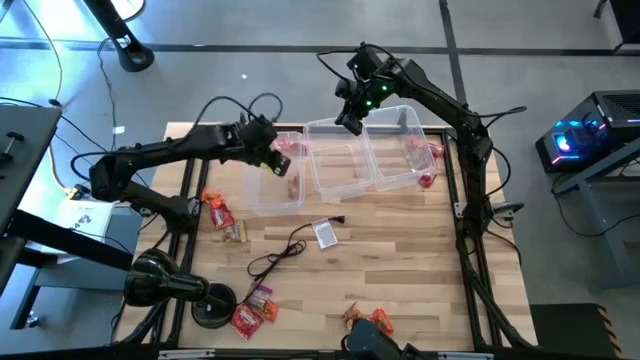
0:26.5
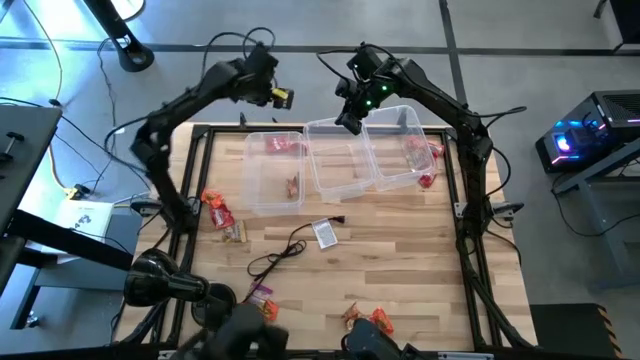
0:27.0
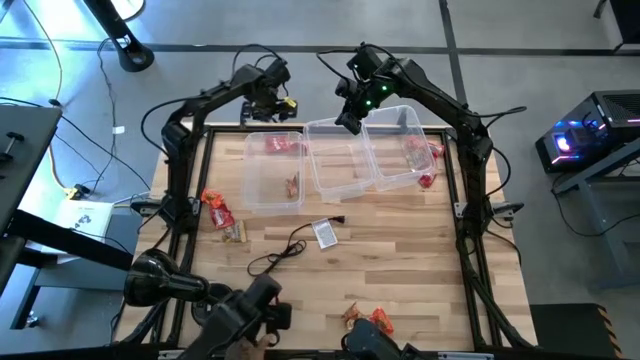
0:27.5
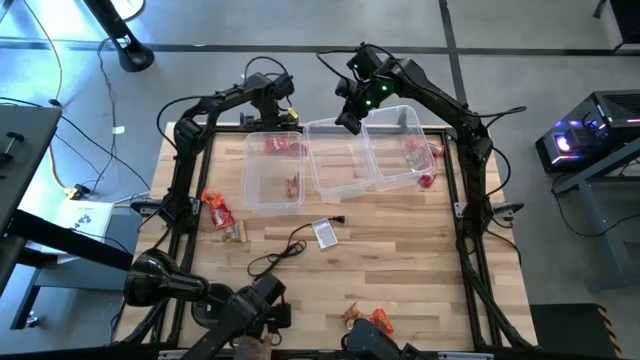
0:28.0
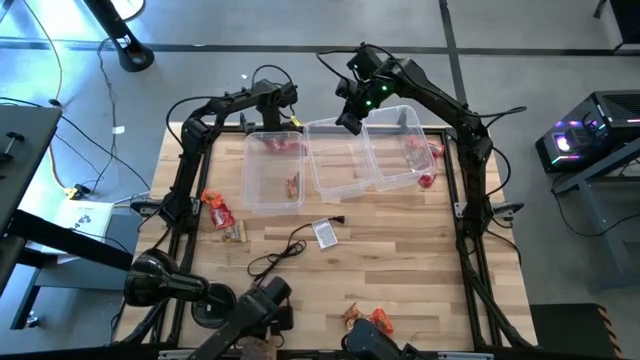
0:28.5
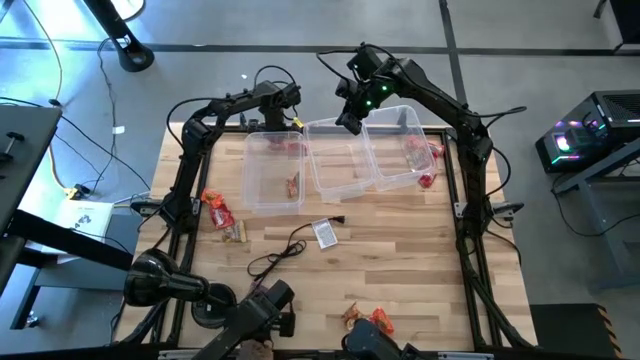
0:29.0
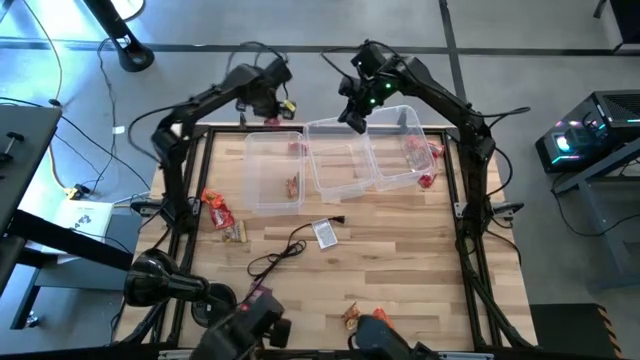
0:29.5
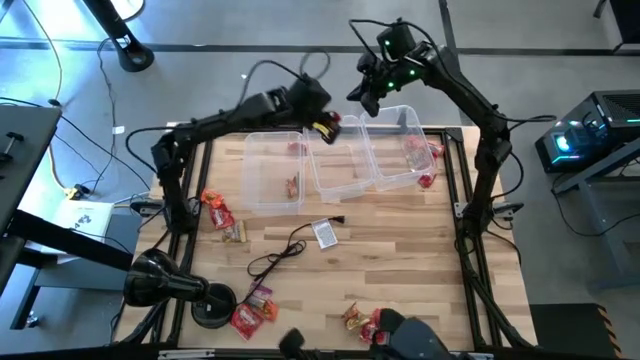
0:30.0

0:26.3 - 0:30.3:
Task: Sort candy
Put the red candy pack into the middle transparent bin

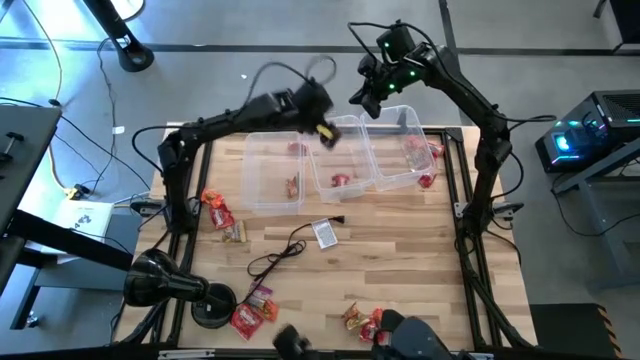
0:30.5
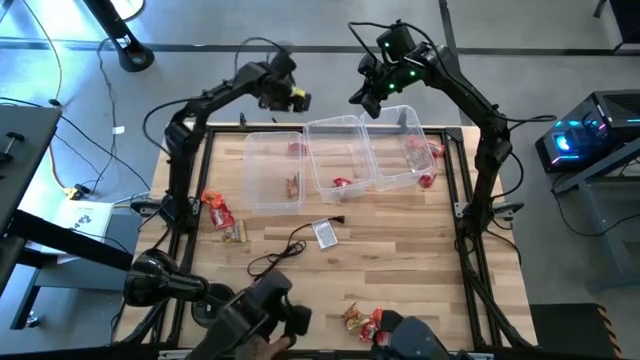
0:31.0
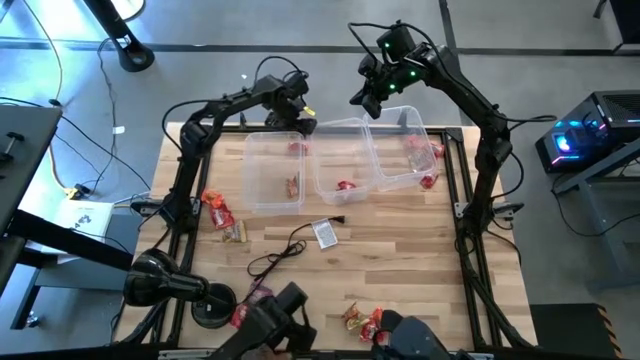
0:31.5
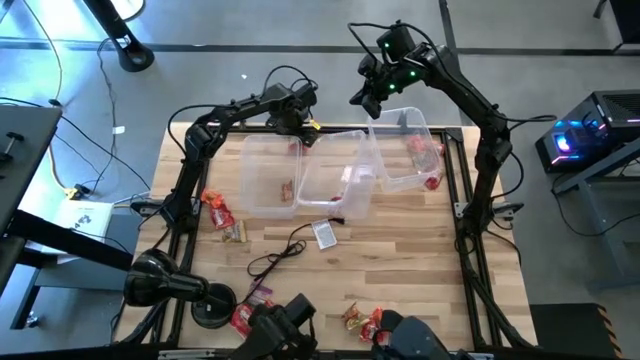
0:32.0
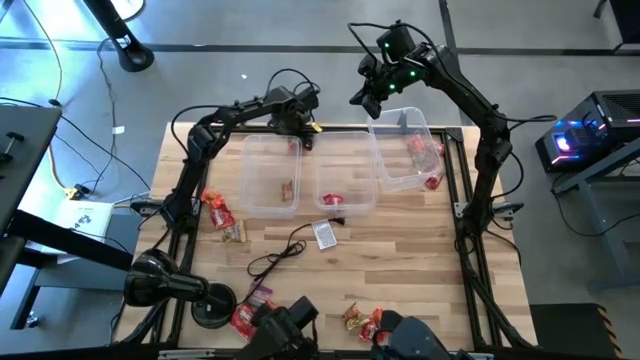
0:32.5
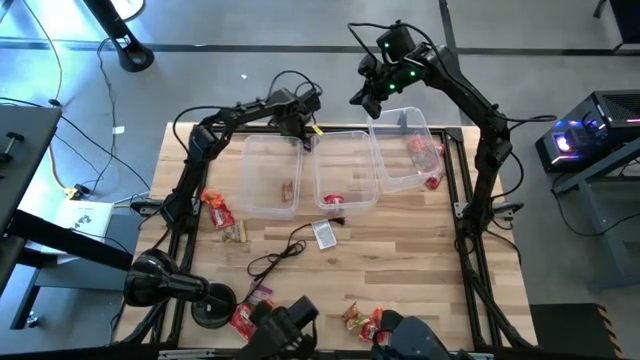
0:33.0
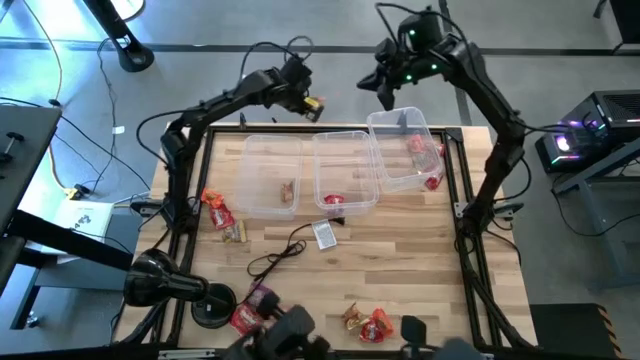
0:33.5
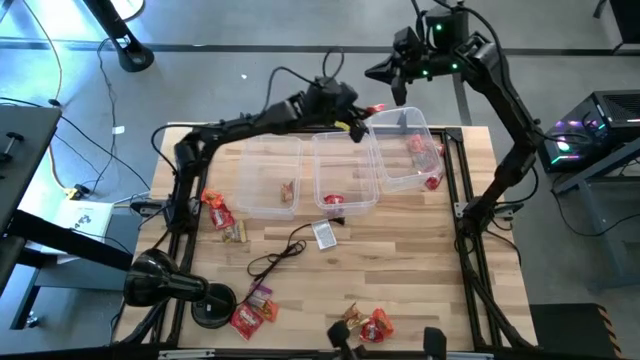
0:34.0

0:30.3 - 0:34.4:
Put the orange candy pack into the right transparent bin

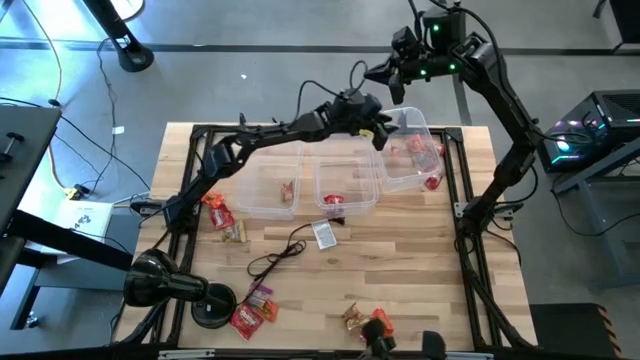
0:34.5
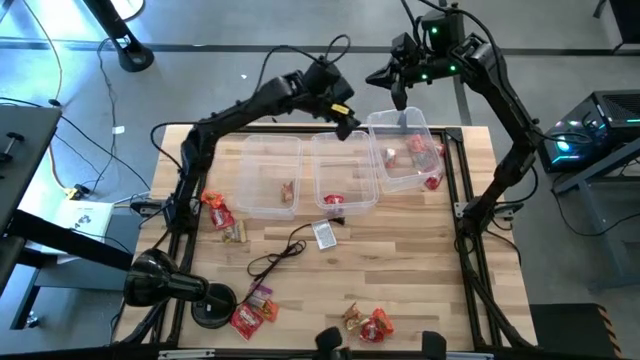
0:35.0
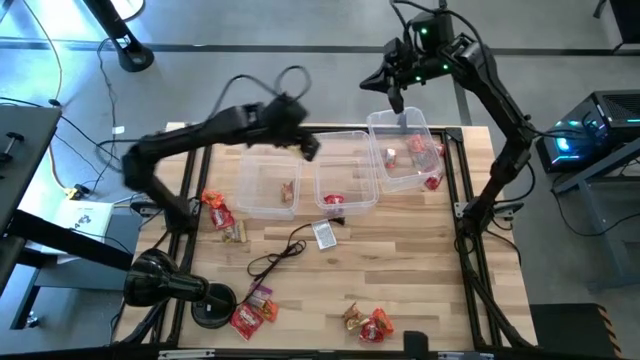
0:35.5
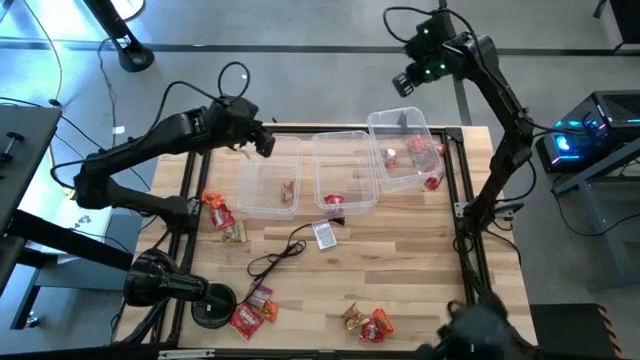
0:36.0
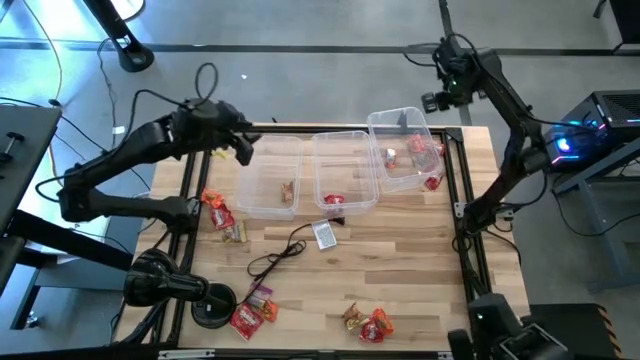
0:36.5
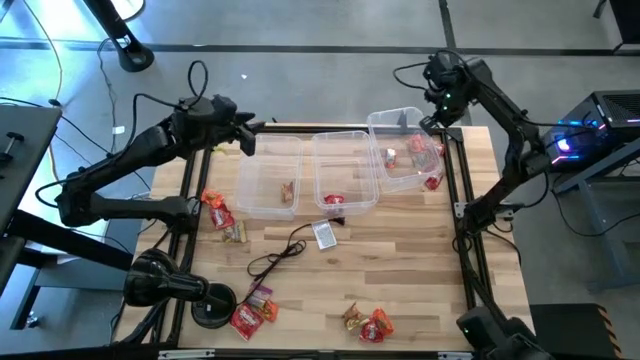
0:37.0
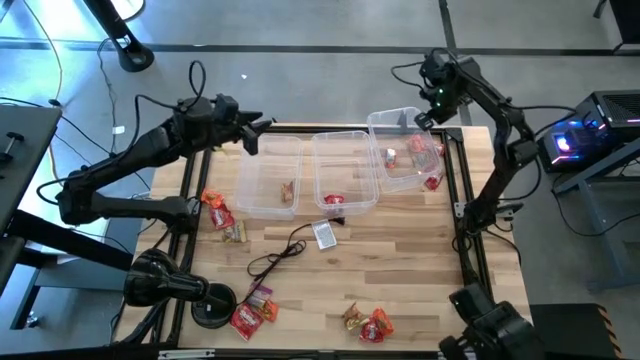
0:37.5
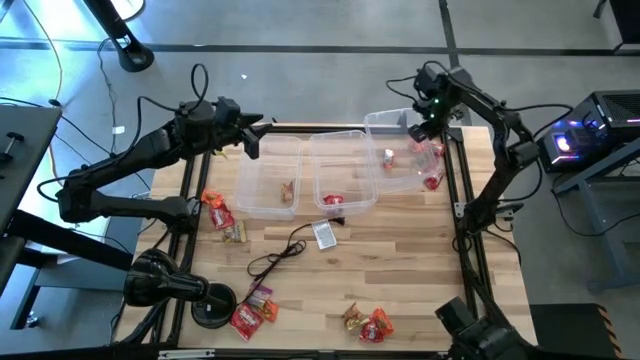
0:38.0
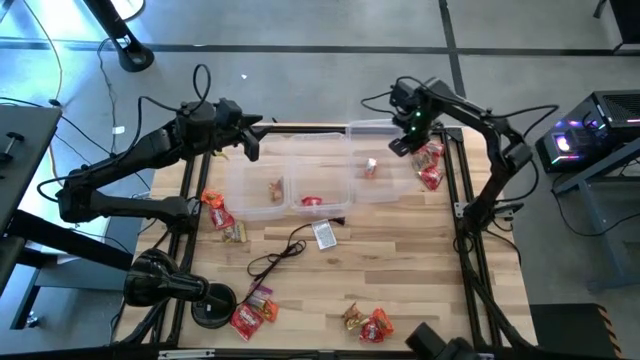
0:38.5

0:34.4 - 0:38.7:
Adjust the transparent bins

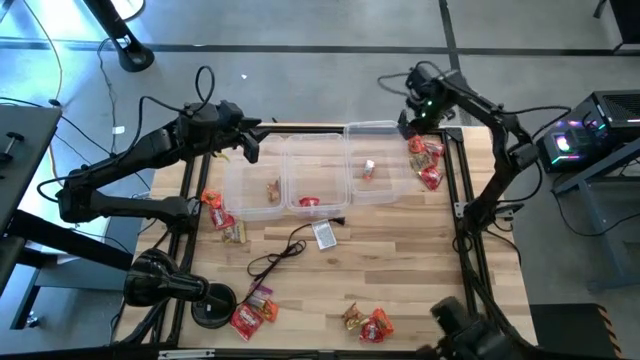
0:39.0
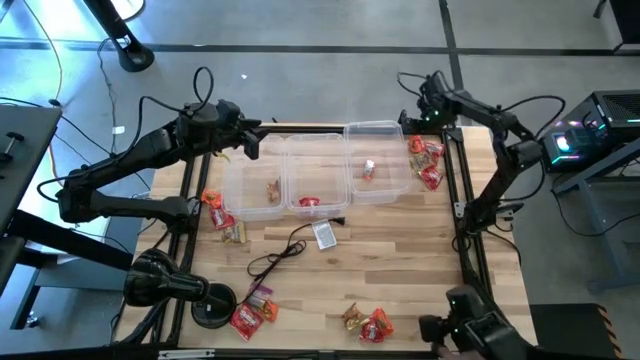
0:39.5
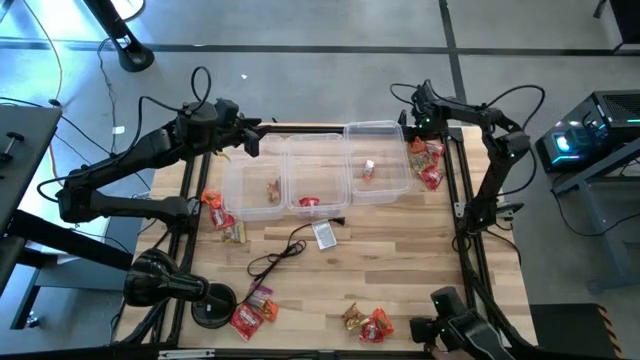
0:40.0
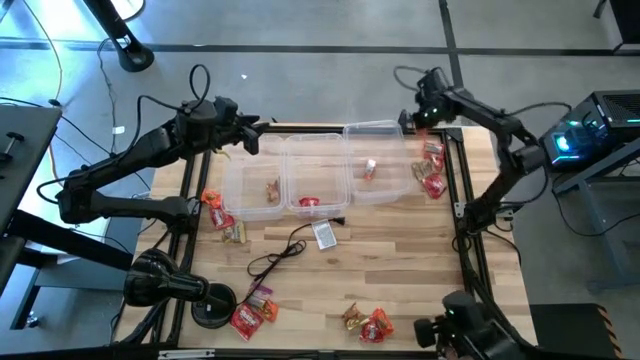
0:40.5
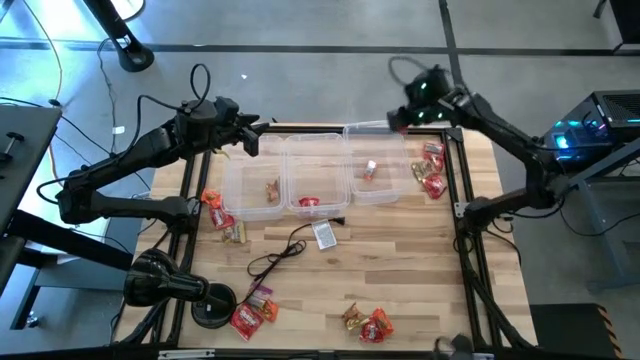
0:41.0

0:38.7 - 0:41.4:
Put the top right orange candy pack into the right transparent bin

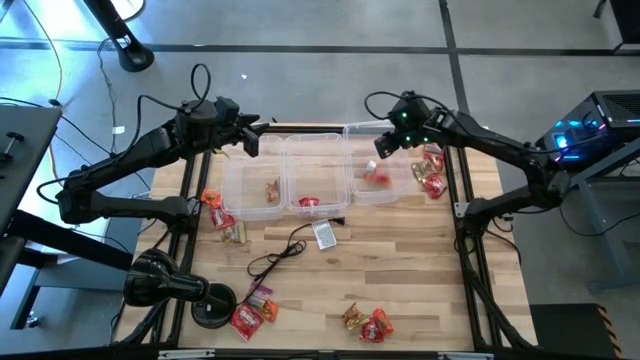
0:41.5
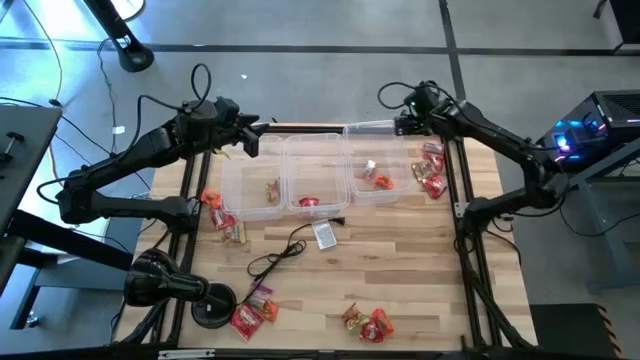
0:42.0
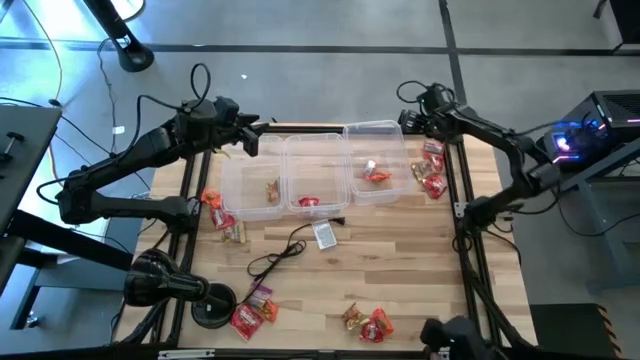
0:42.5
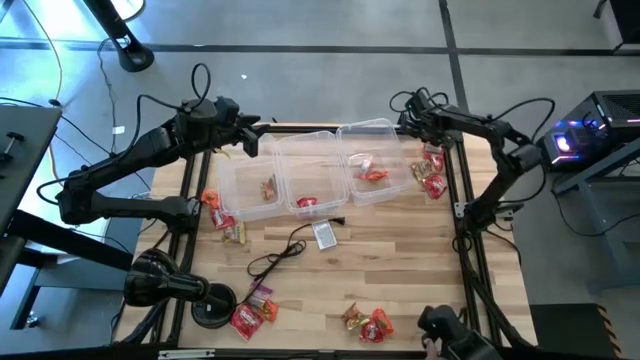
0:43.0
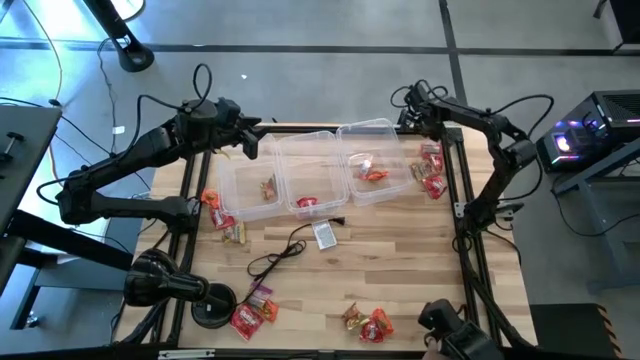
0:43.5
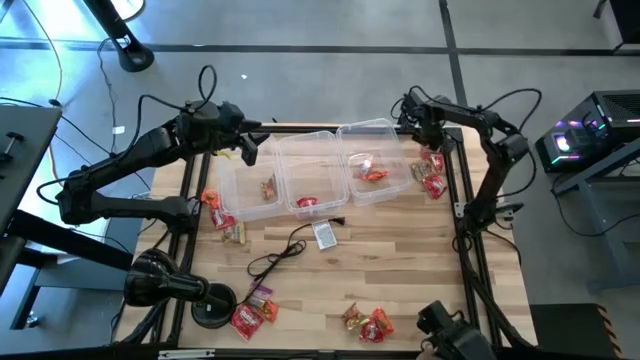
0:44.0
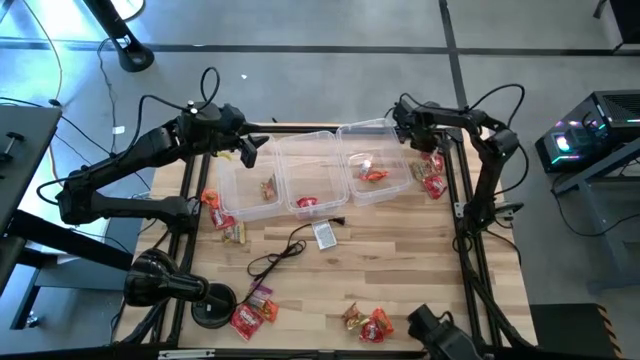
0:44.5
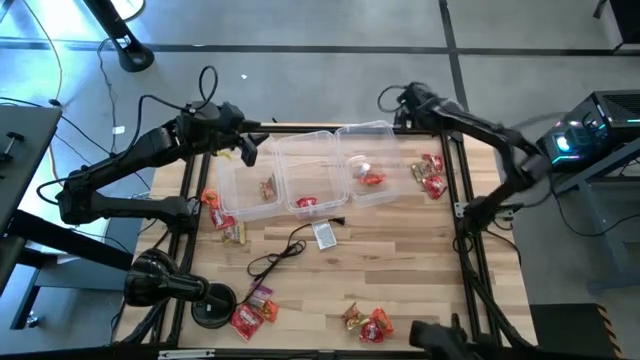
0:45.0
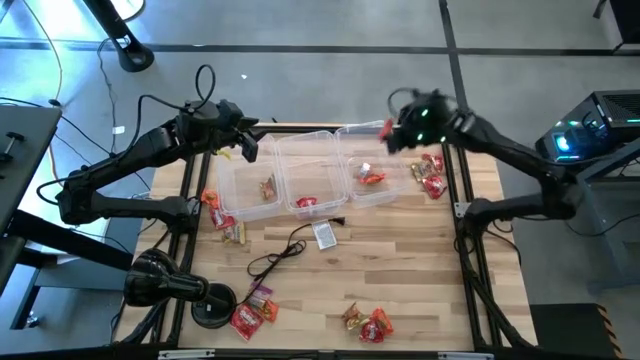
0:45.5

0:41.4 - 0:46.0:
Put the orange candy pack into the right transparent bin

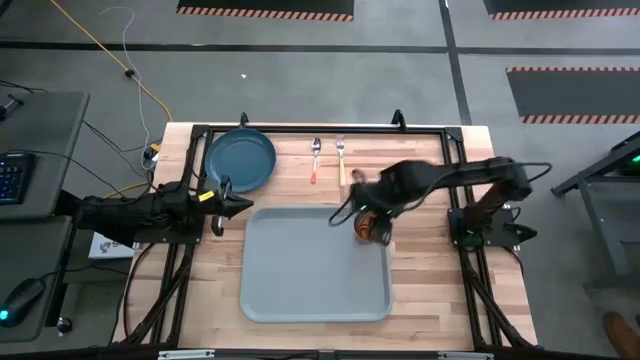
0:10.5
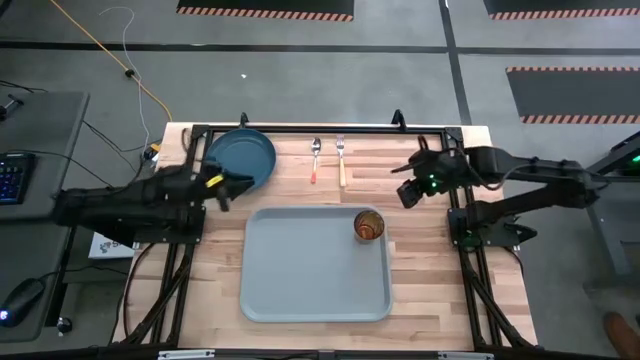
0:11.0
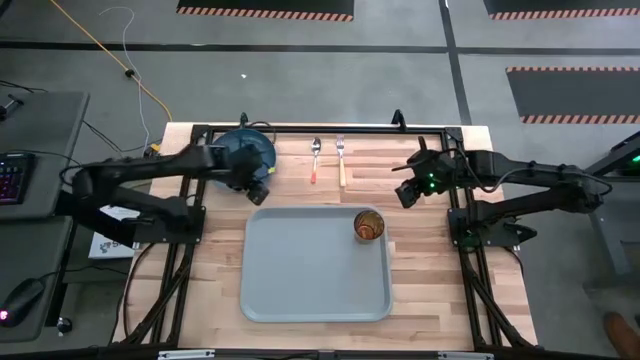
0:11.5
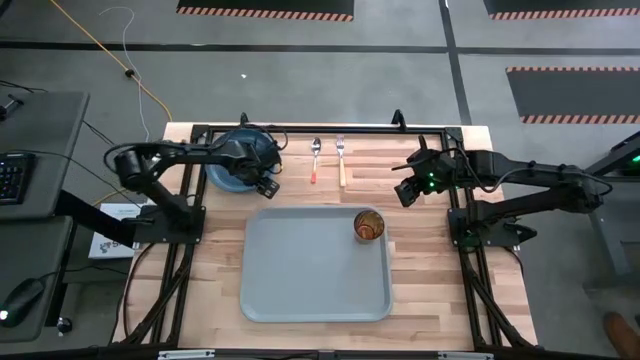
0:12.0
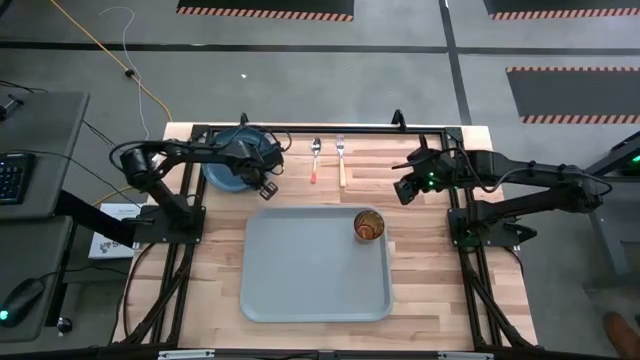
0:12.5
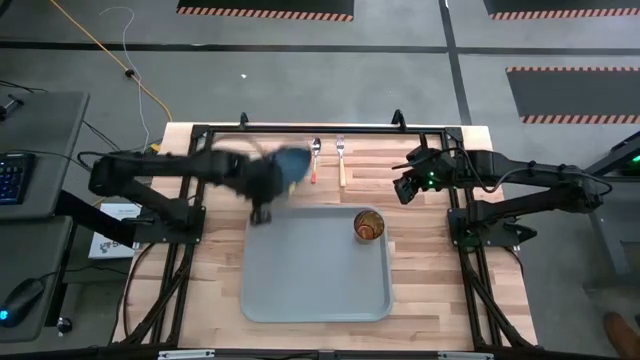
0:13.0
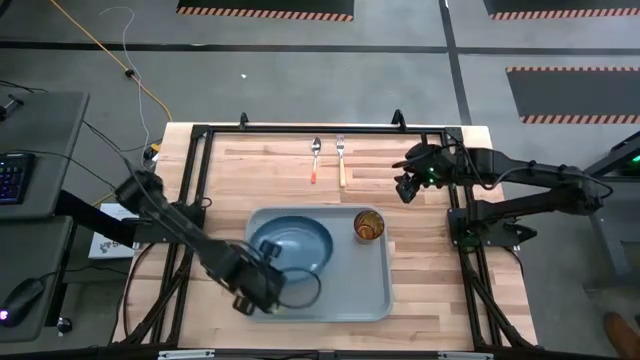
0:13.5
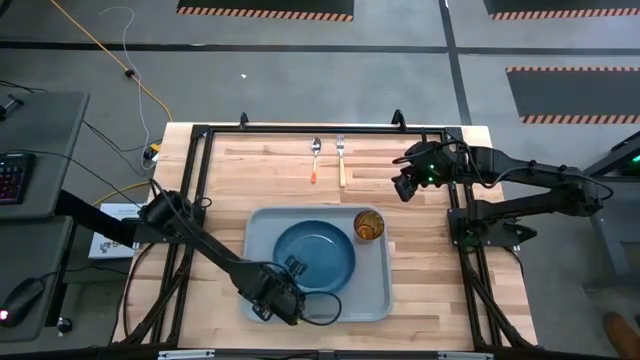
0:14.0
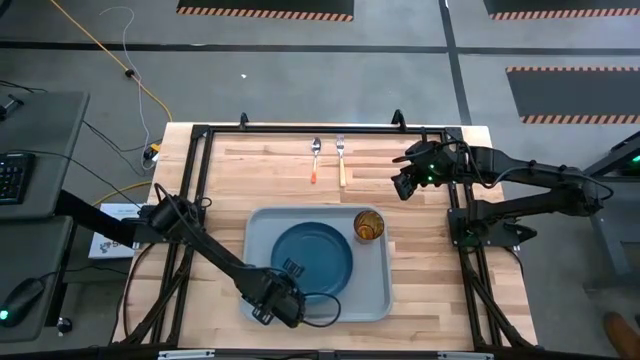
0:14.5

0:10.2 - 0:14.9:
Task: Pick and place plate/cup/fork/spoon on tray
Put the blue plate on the gray serving tray to the bottom left of the brown glass
